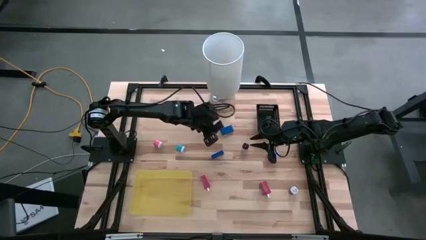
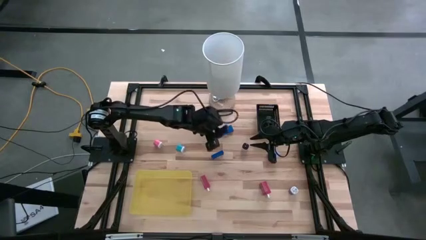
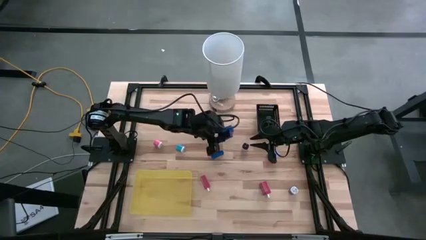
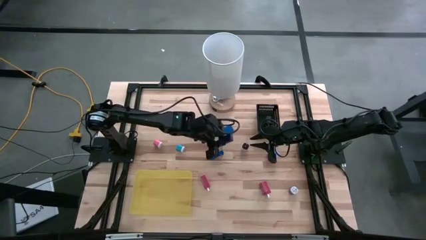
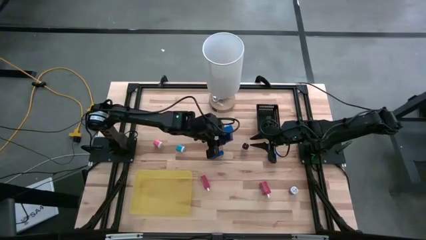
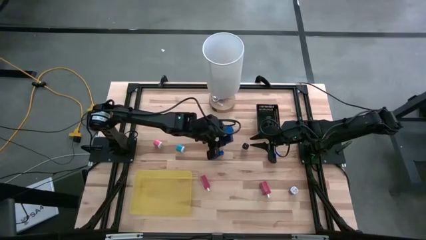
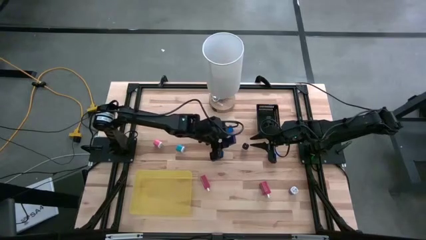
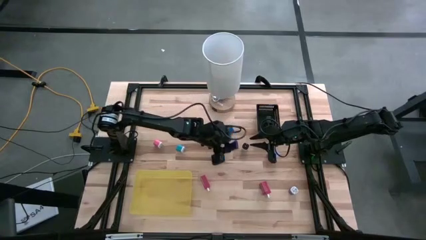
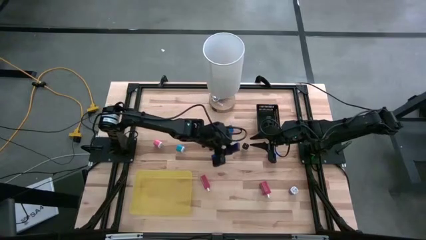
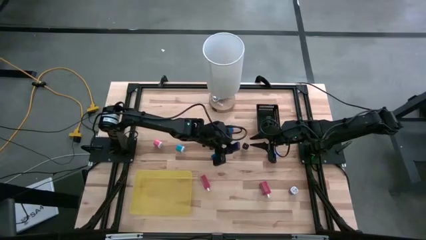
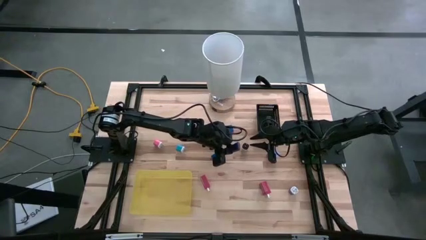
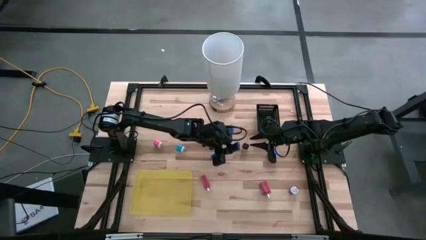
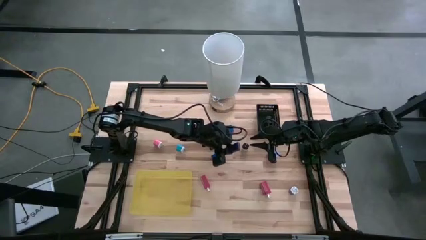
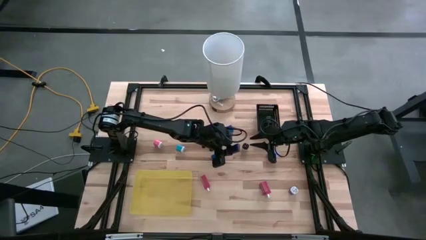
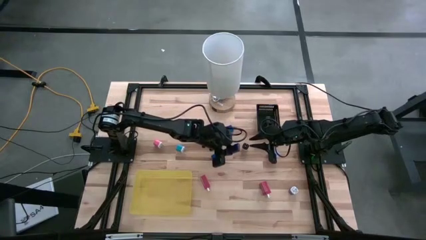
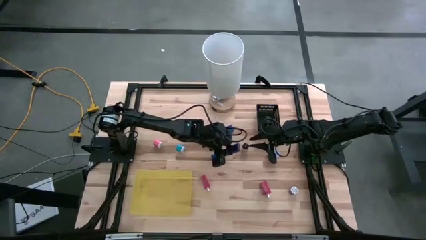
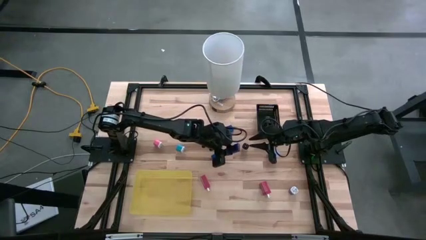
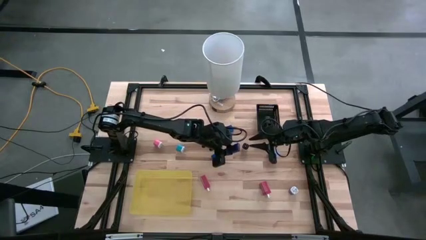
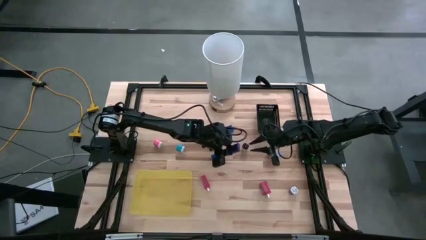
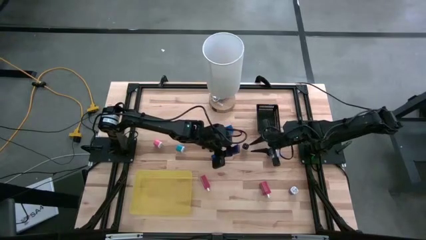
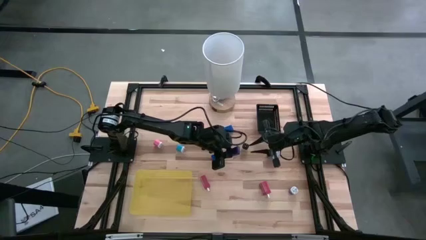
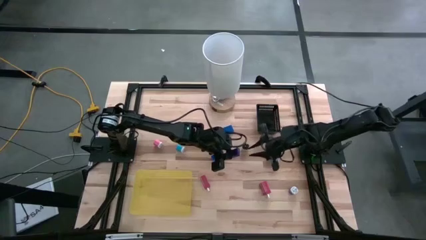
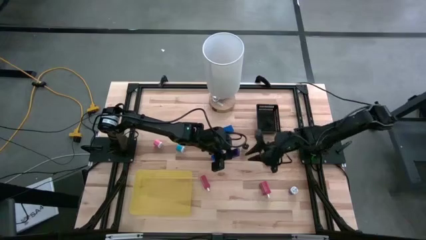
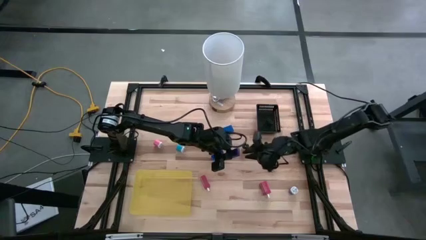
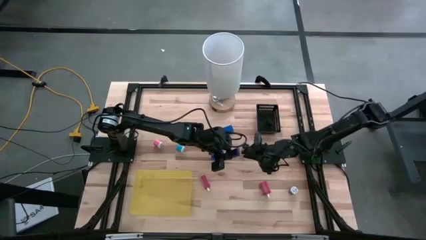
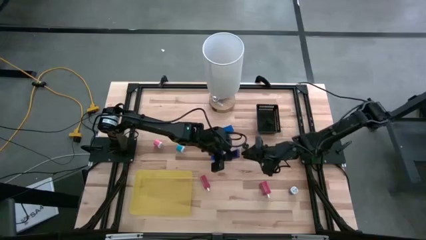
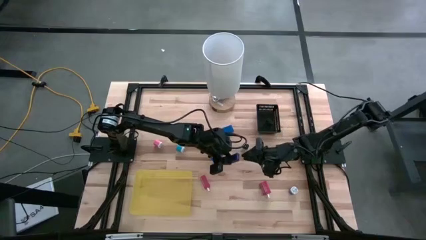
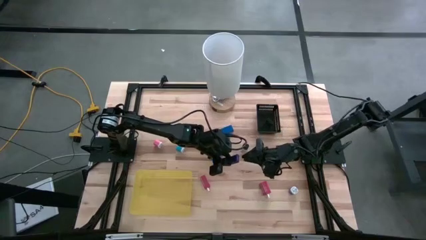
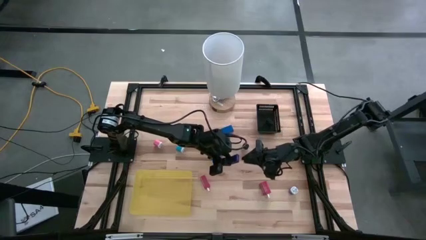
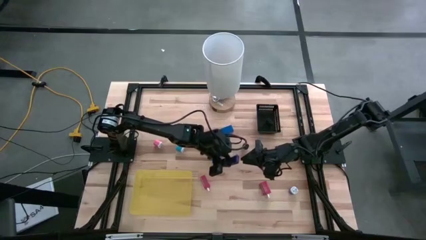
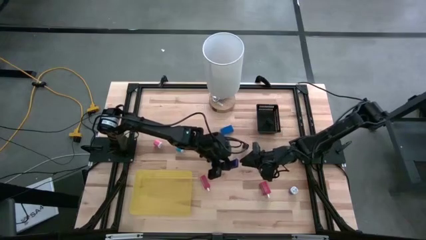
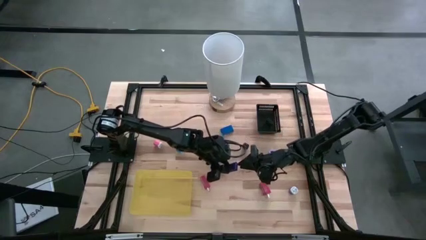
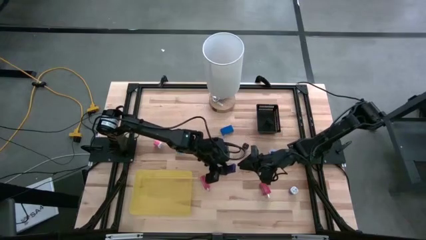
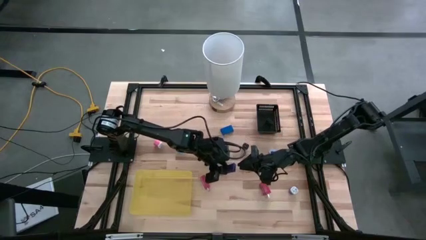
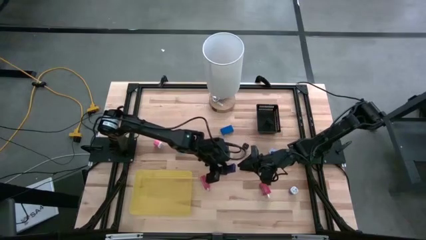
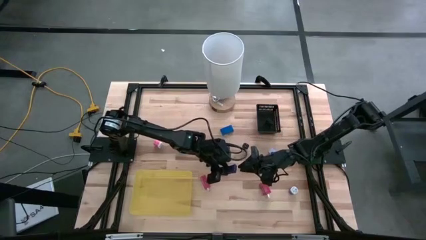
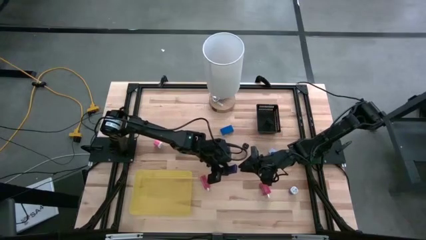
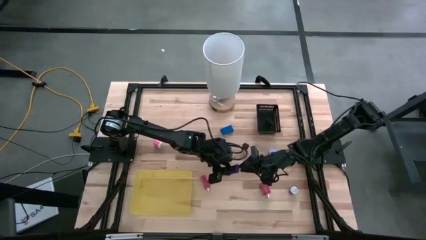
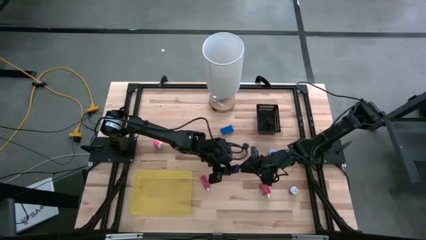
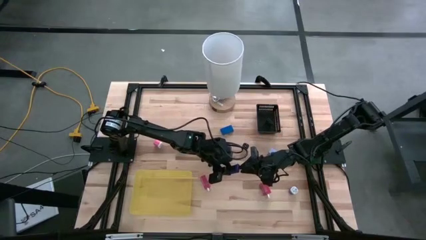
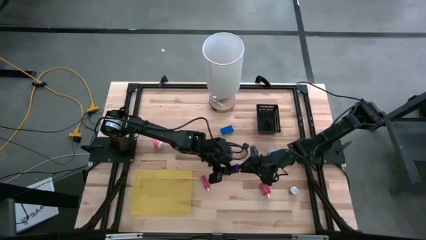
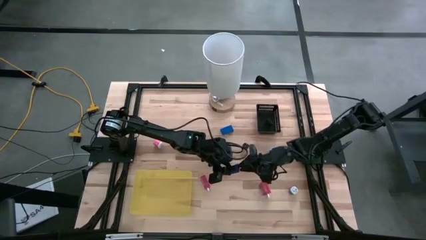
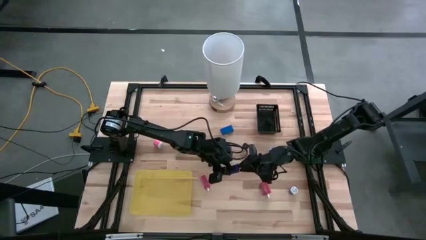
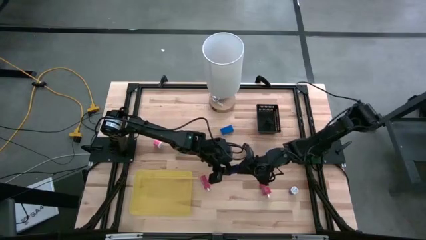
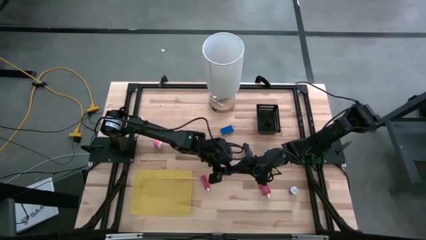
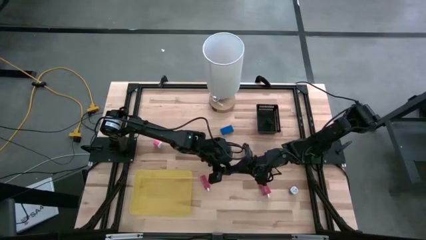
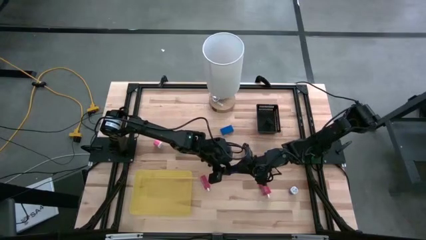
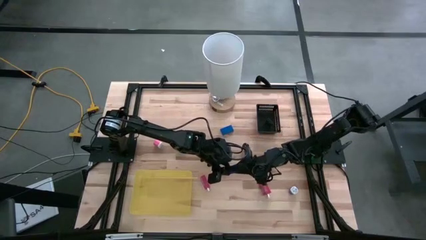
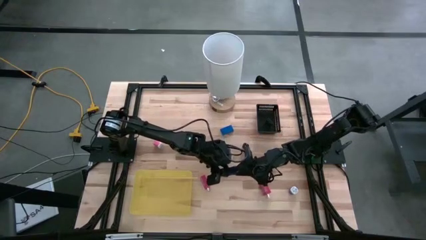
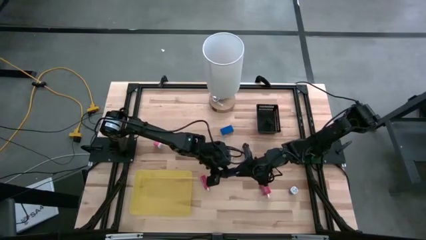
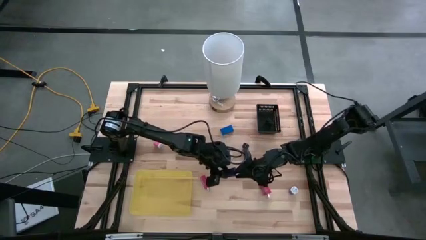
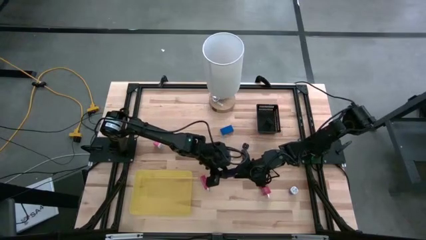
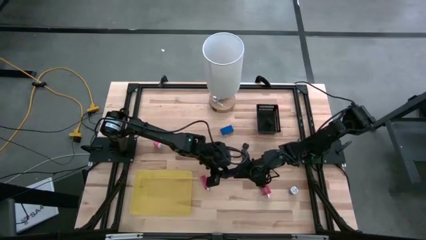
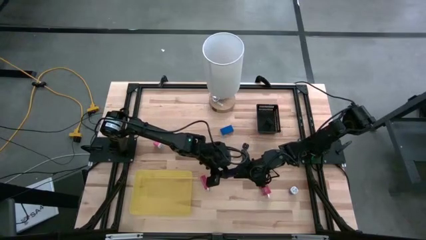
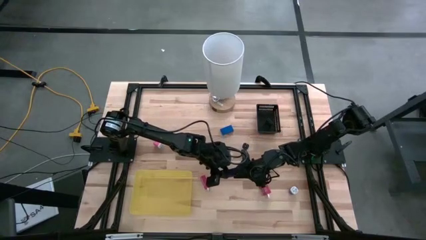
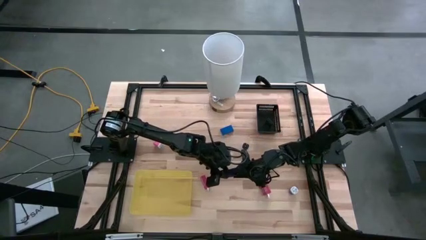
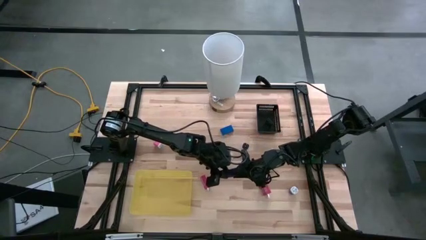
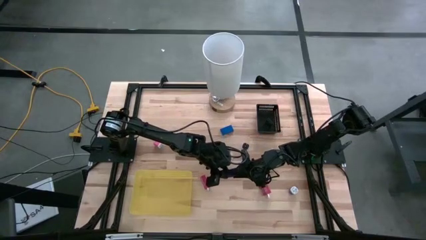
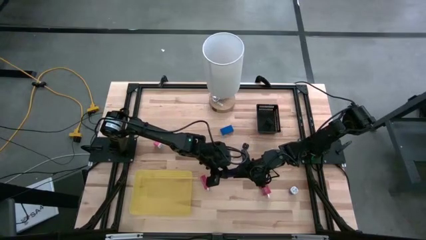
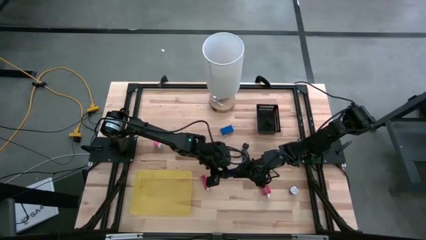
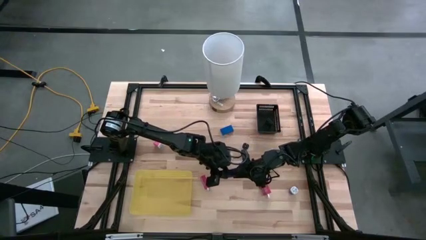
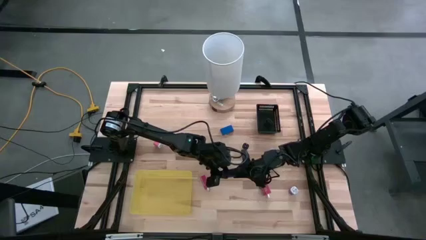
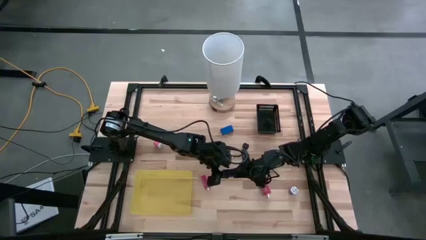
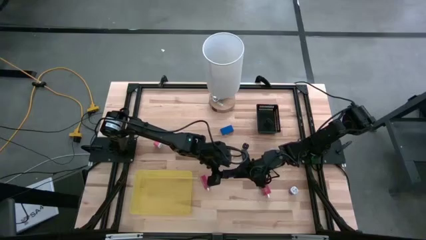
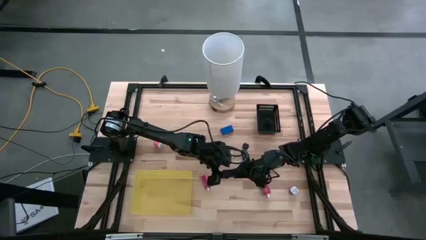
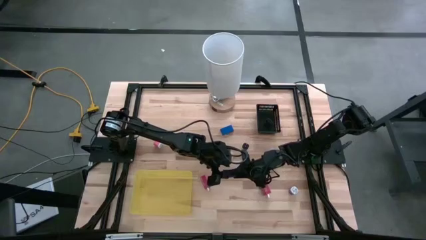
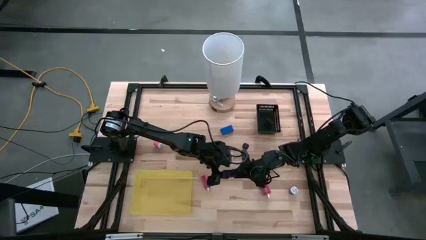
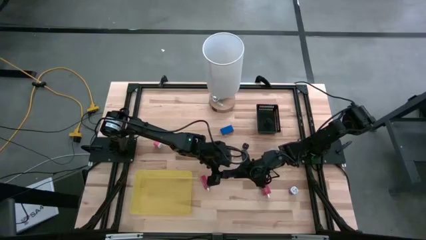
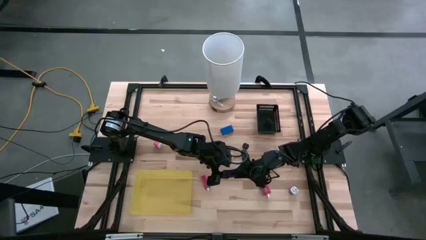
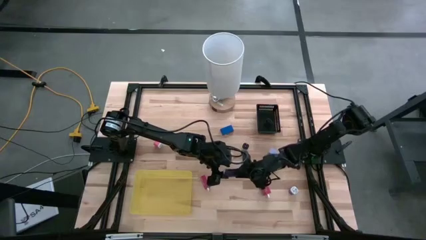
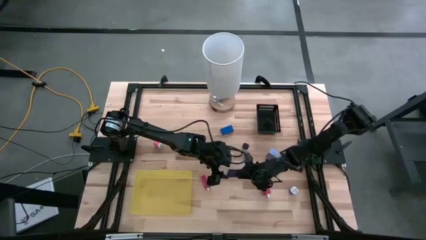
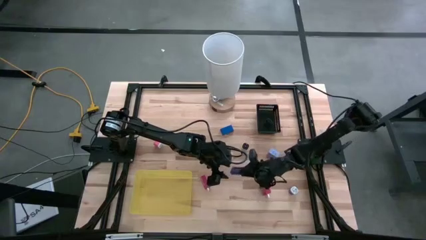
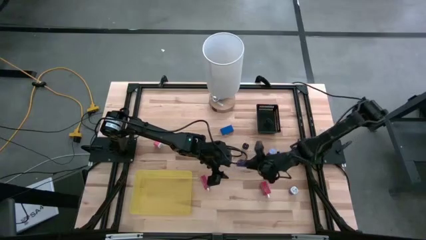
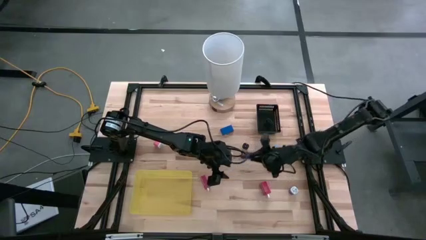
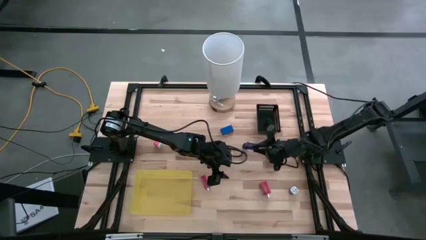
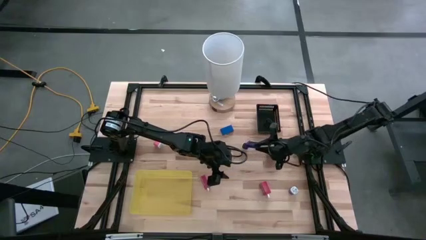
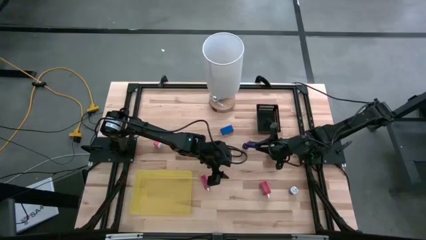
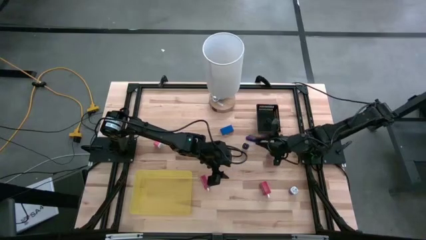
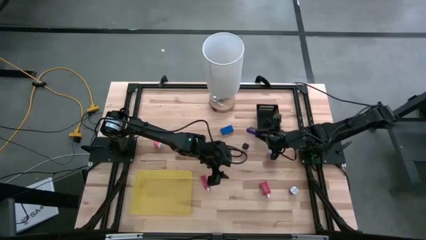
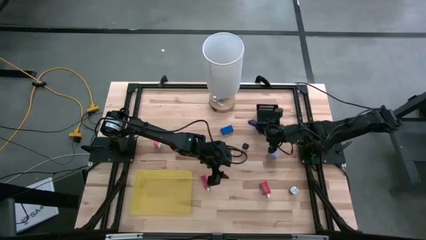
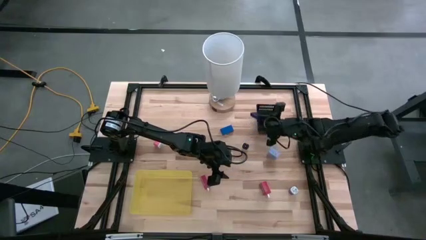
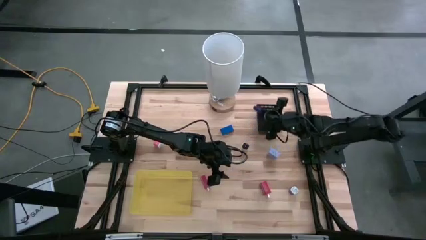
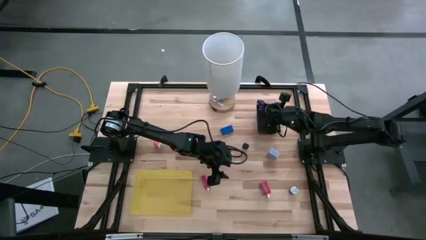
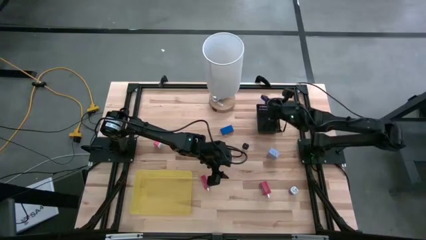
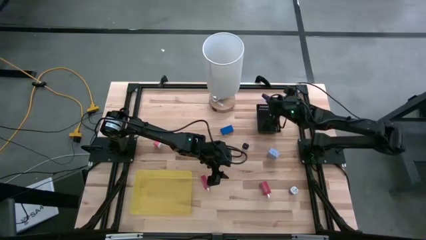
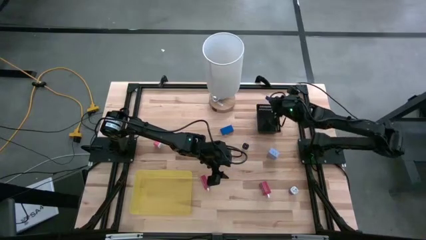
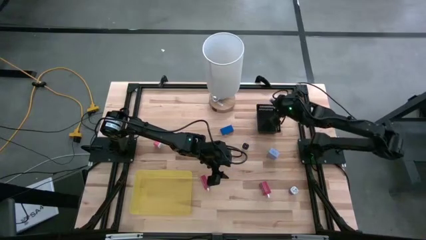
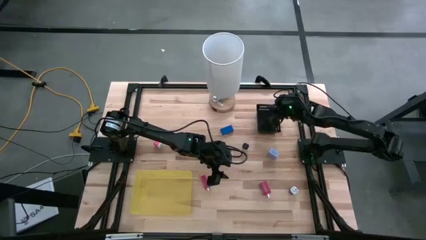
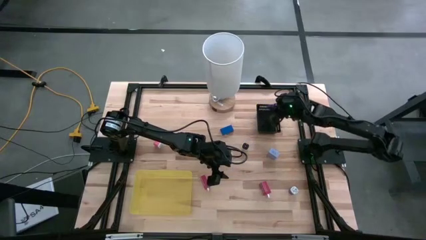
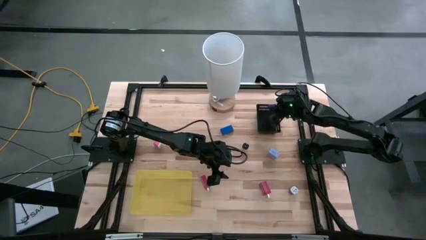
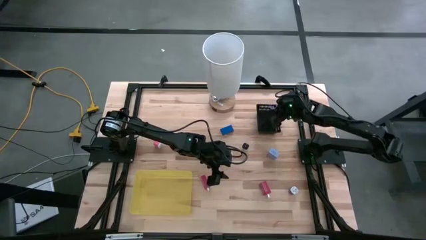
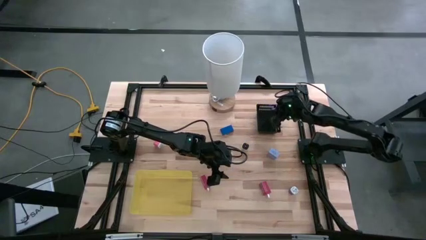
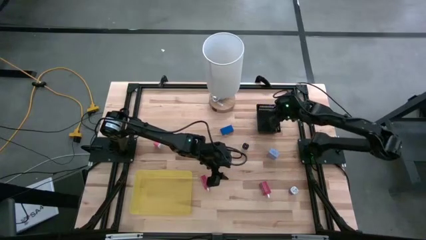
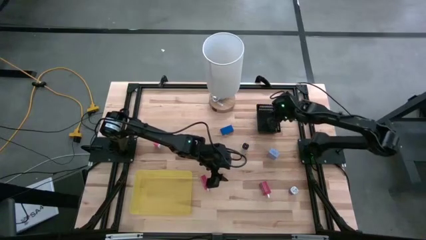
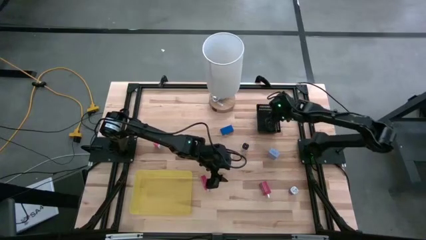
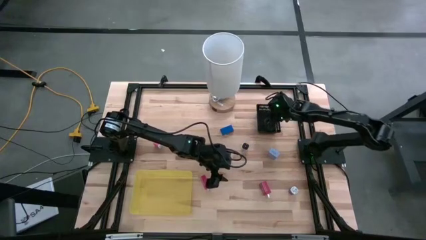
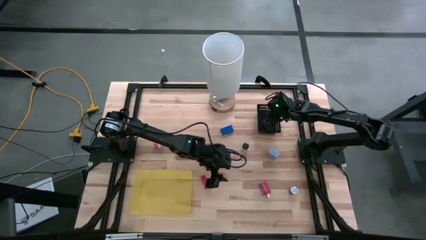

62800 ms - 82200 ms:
Task: Pick & Place Office items
Put the violet digital clock into the black bin
